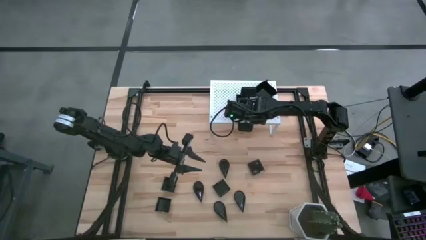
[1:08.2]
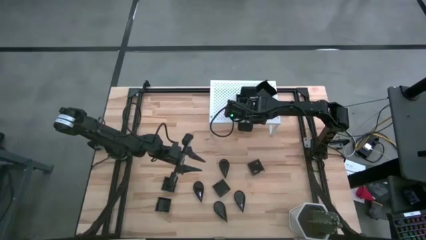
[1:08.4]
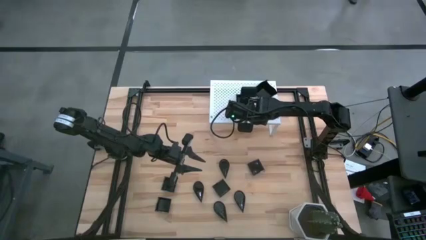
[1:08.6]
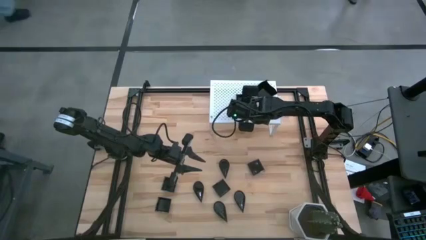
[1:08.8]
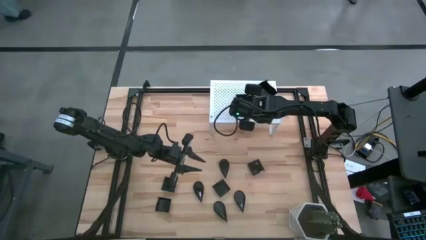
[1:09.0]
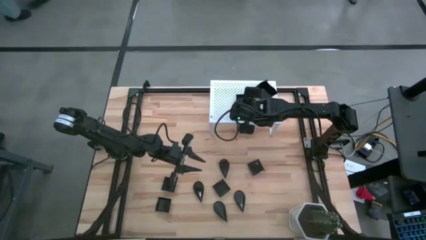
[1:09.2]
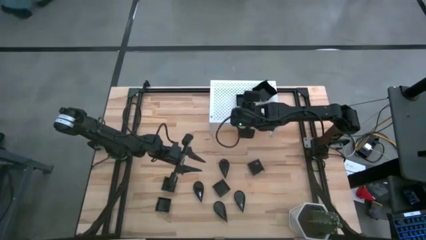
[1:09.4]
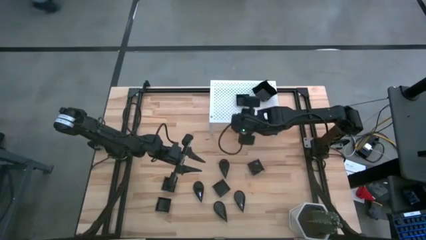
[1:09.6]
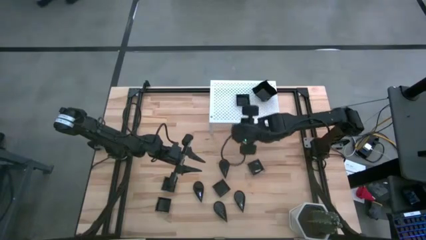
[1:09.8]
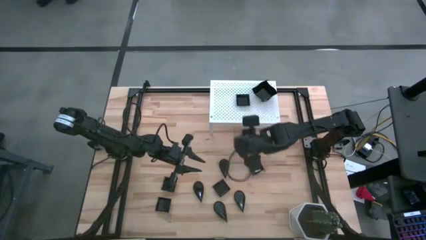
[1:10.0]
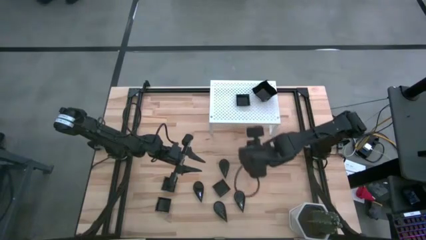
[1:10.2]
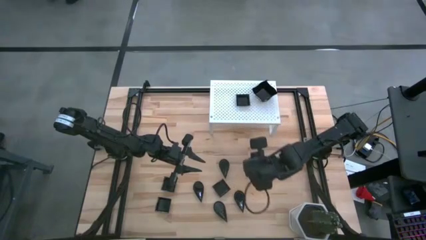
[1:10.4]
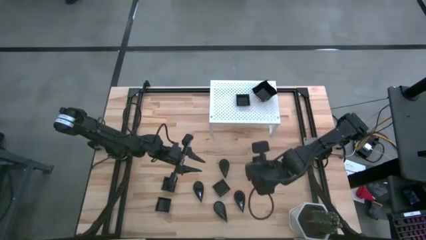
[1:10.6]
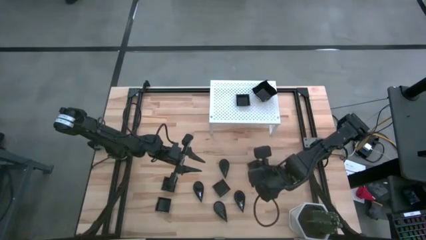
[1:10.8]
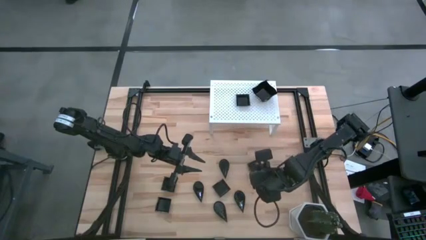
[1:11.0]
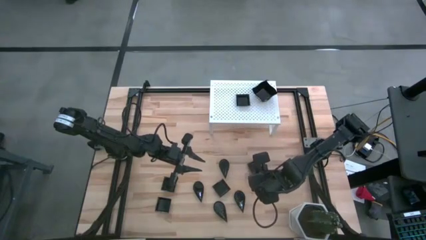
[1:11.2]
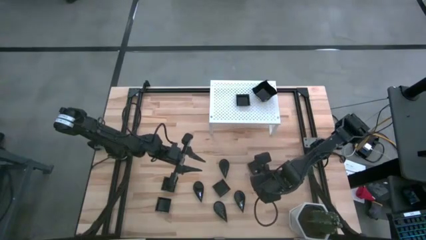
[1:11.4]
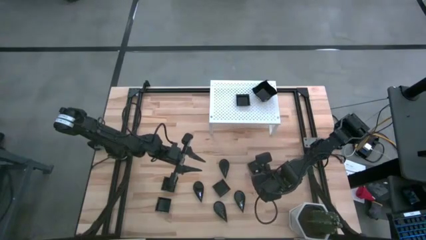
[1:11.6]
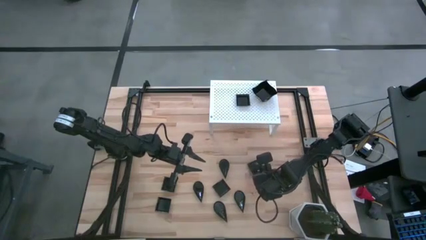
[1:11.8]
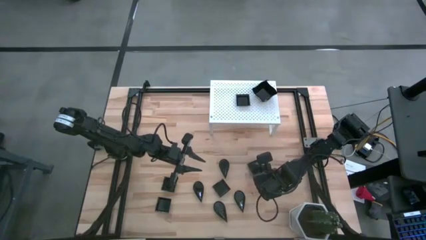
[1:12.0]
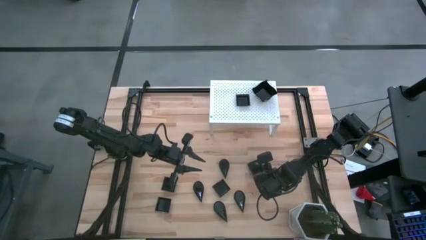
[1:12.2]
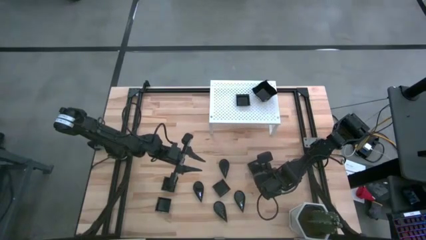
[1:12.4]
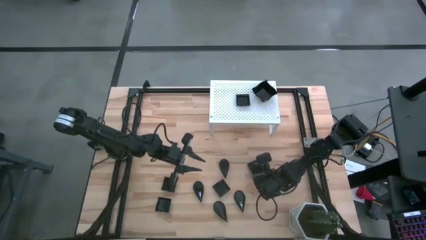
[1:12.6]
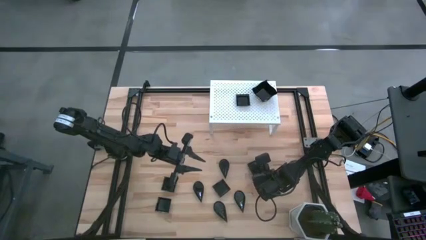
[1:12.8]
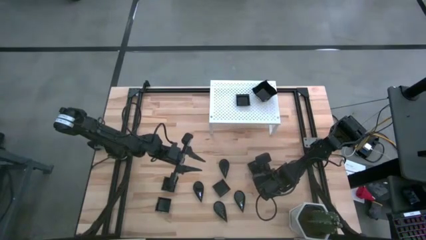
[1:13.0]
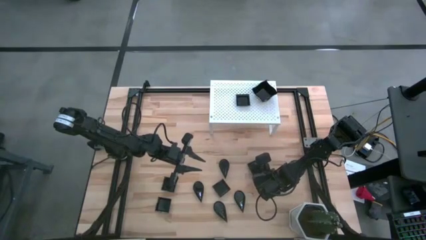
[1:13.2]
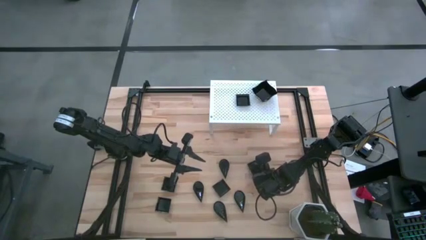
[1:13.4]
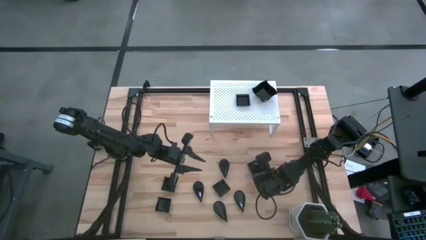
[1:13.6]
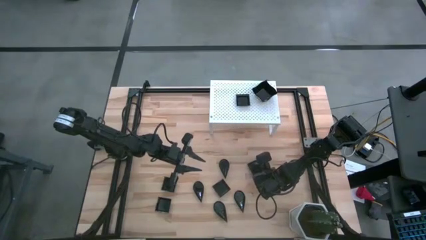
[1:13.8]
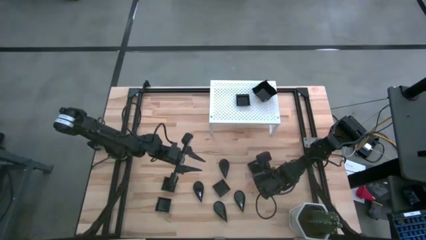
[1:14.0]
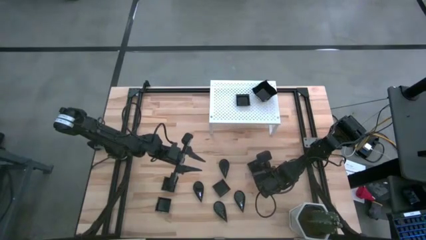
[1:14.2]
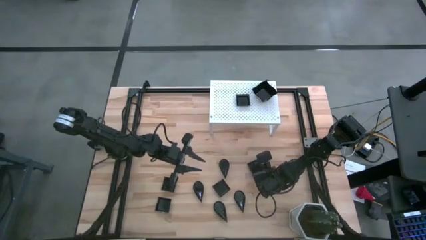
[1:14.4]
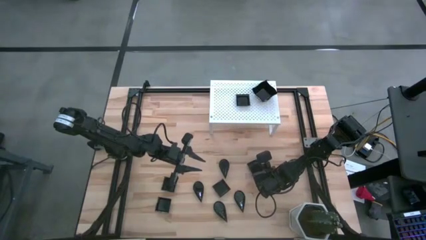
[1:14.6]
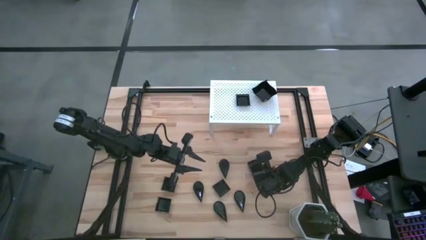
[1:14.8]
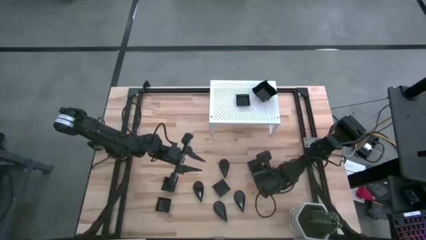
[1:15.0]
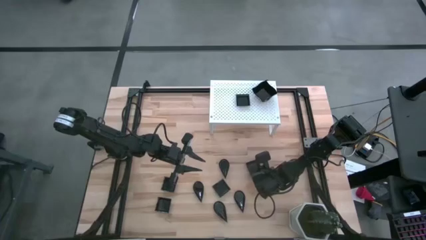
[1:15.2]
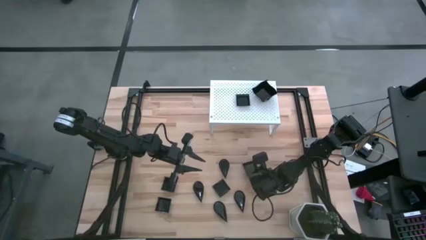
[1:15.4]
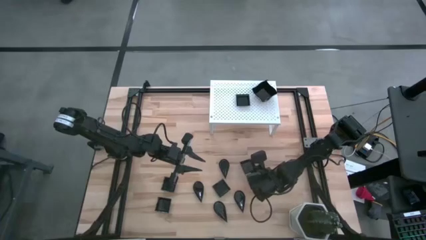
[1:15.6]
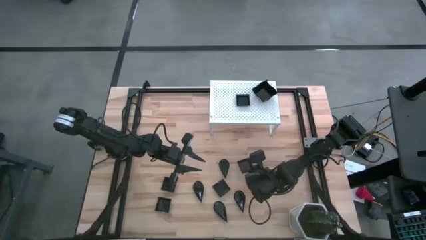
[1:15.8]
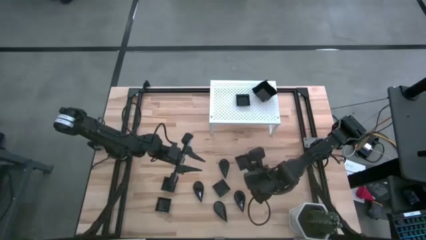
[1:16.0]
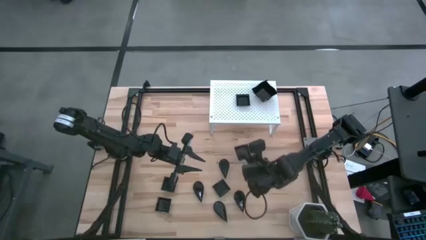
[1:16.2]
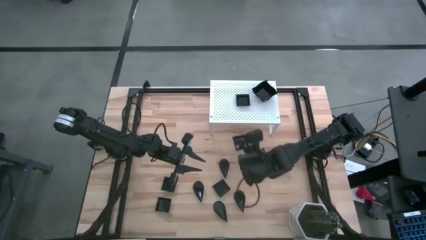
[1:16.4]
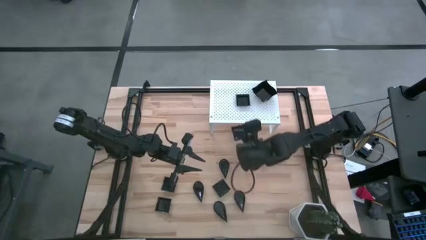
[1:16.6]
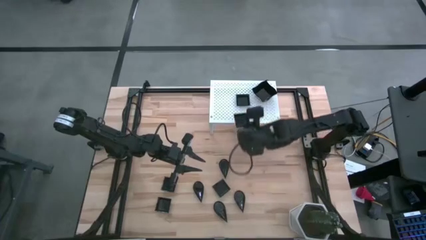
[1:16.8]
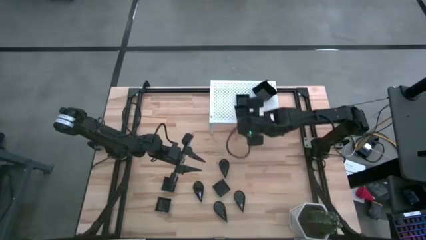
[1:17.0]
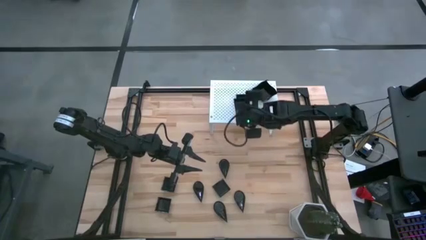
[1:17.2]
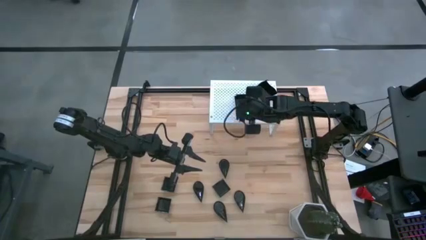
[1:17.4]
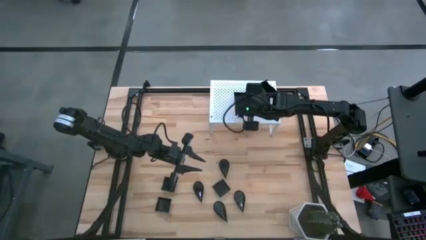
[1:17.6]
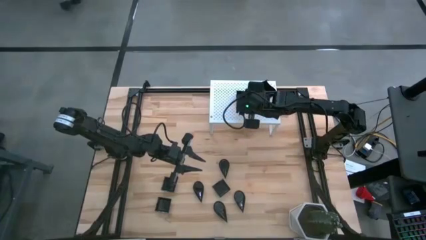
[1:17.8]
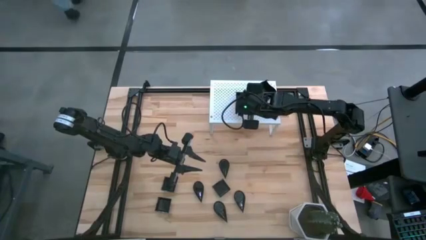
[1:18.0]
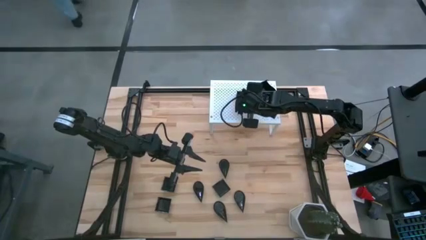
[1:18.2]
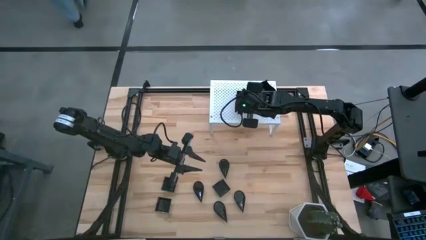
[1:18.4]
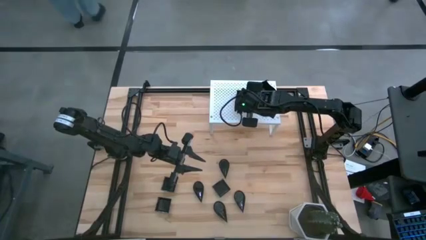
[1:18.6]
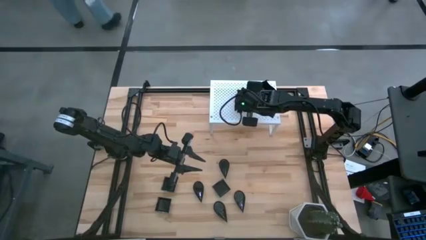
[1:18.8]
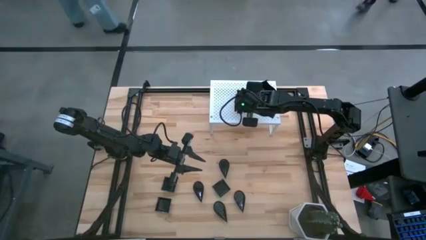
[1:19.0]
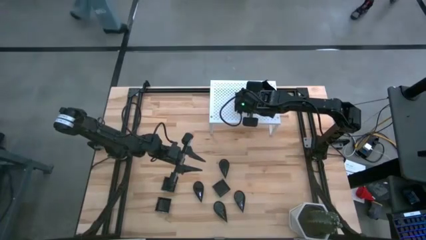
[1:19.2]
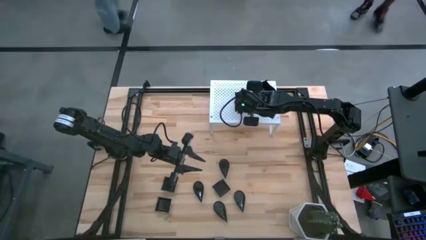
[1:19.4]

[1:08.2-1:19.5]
Task: Pick & Place Mini shaped plates
Stack the square plate on top of the square plate on the shelf
